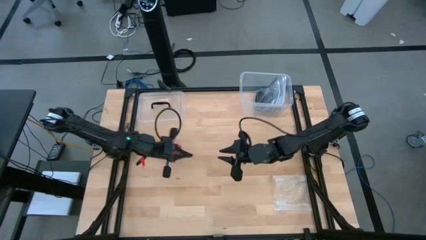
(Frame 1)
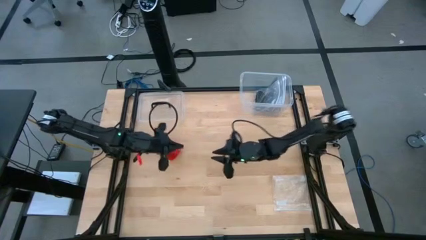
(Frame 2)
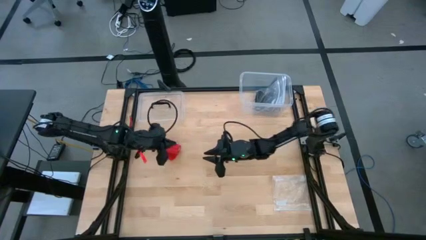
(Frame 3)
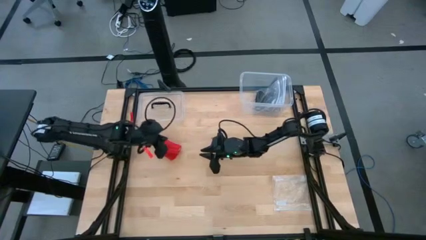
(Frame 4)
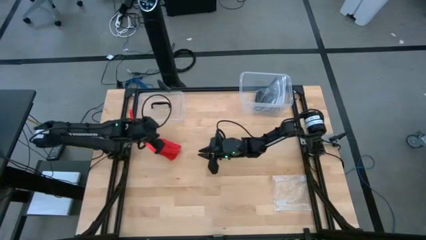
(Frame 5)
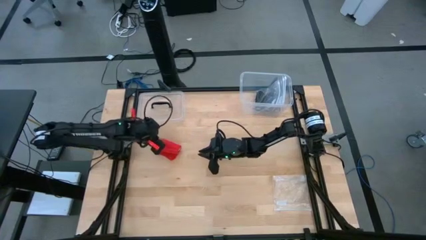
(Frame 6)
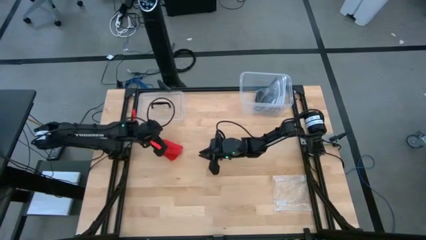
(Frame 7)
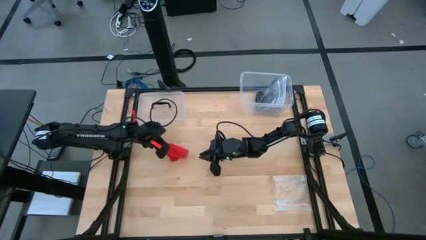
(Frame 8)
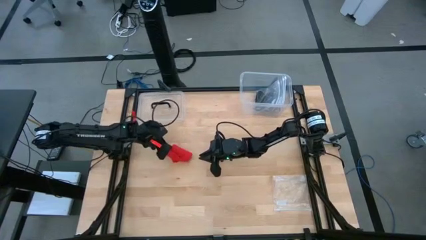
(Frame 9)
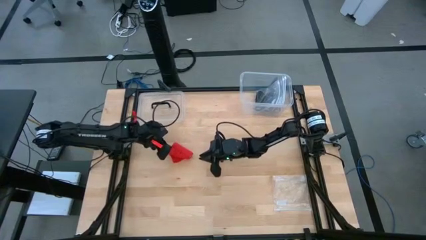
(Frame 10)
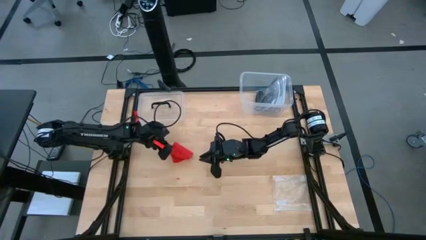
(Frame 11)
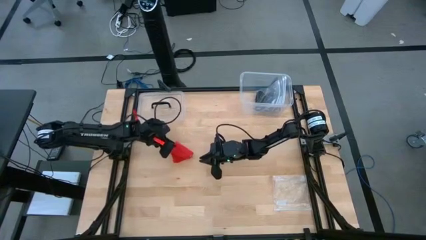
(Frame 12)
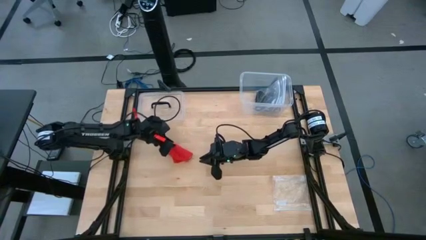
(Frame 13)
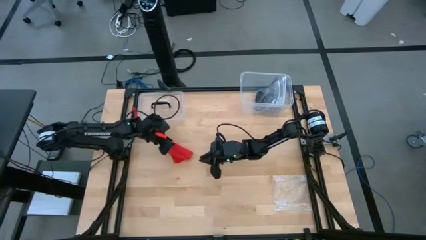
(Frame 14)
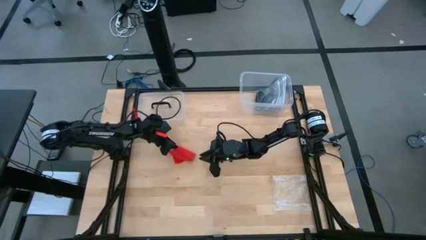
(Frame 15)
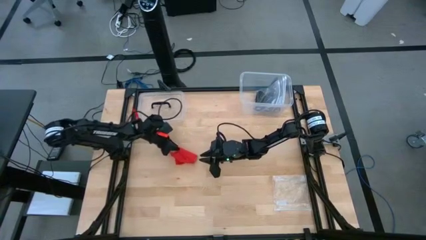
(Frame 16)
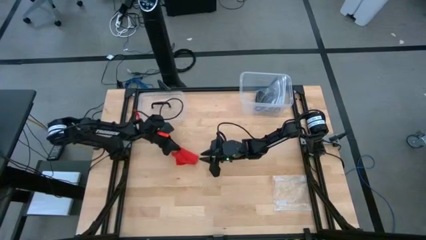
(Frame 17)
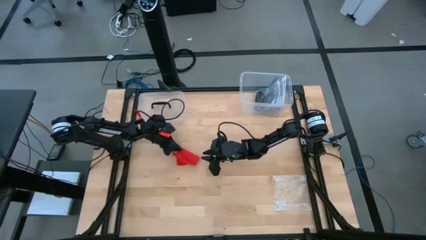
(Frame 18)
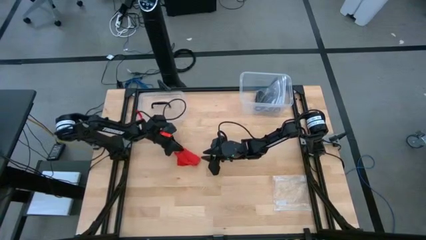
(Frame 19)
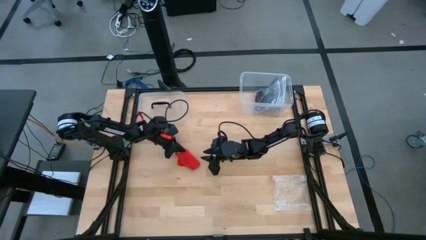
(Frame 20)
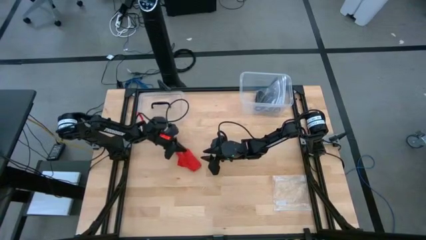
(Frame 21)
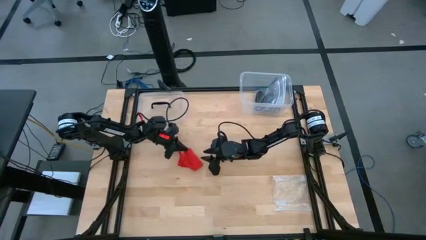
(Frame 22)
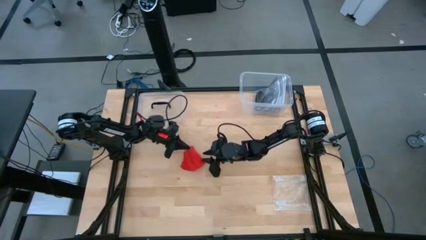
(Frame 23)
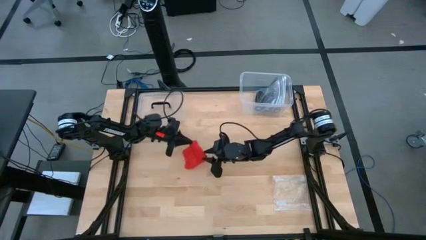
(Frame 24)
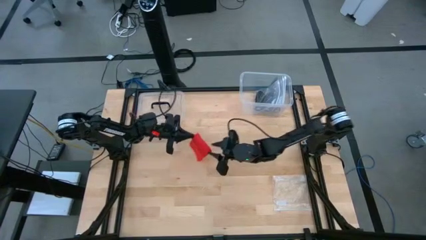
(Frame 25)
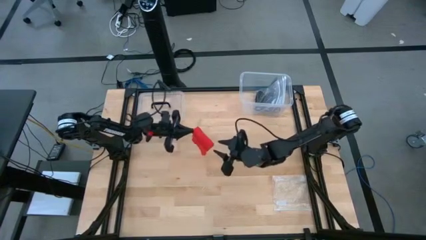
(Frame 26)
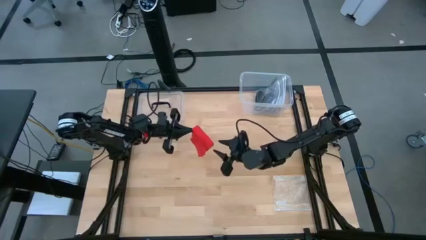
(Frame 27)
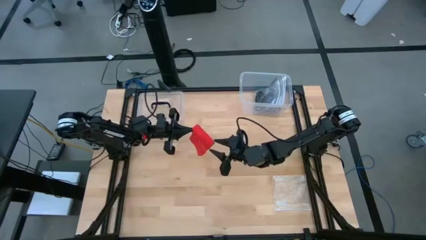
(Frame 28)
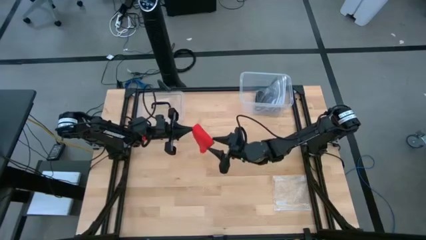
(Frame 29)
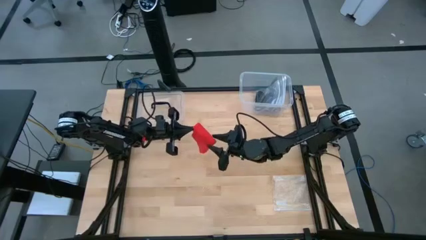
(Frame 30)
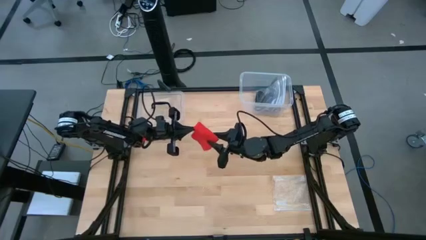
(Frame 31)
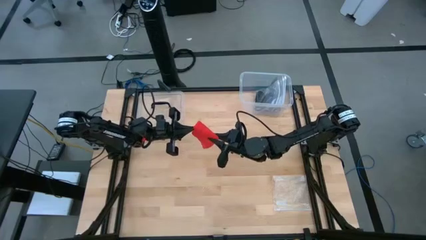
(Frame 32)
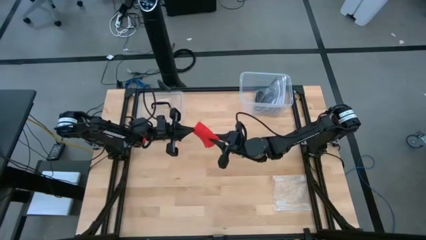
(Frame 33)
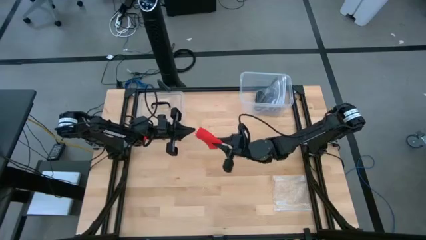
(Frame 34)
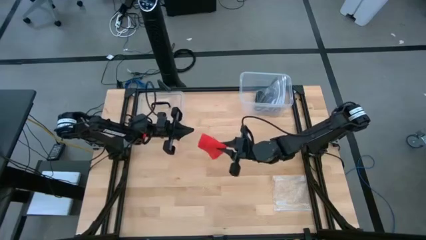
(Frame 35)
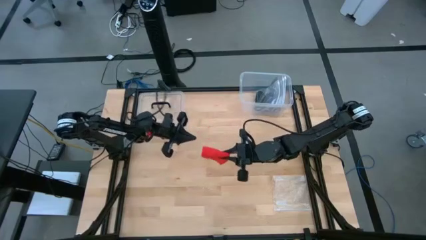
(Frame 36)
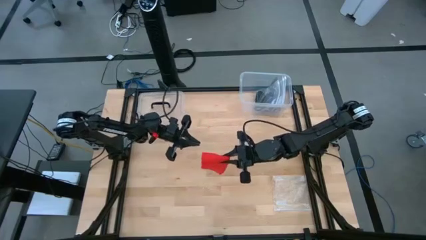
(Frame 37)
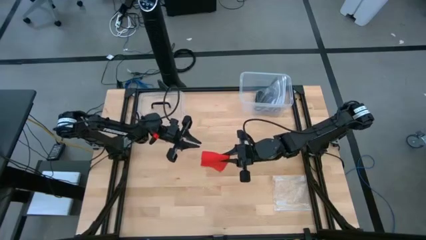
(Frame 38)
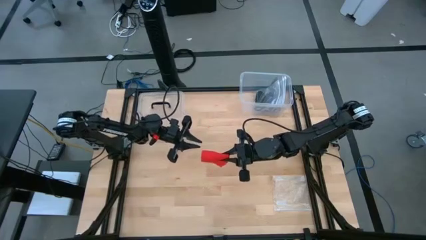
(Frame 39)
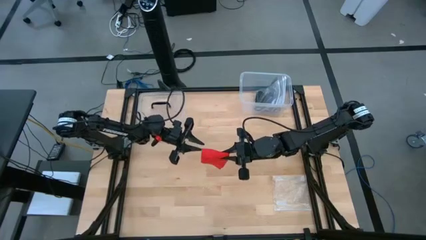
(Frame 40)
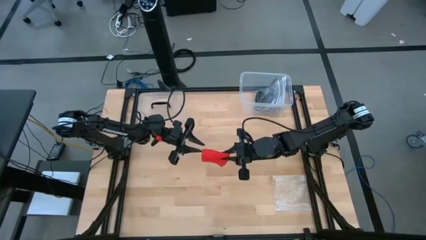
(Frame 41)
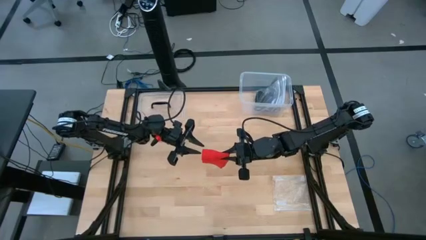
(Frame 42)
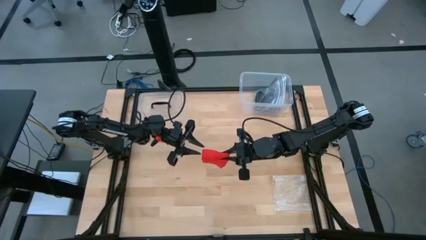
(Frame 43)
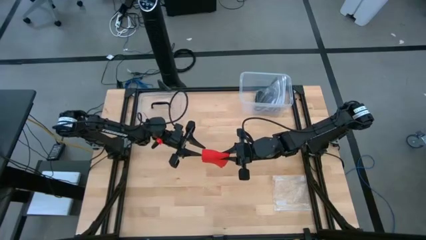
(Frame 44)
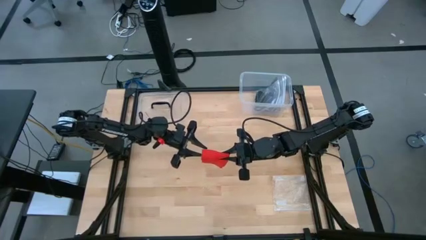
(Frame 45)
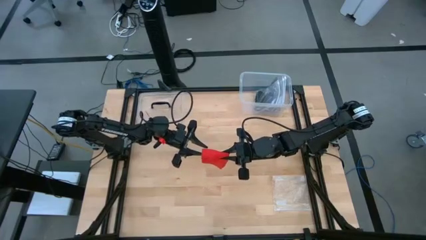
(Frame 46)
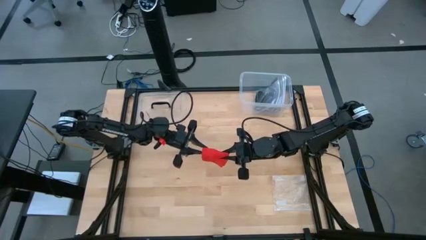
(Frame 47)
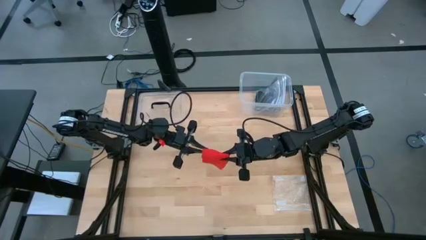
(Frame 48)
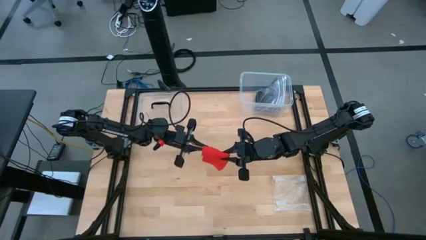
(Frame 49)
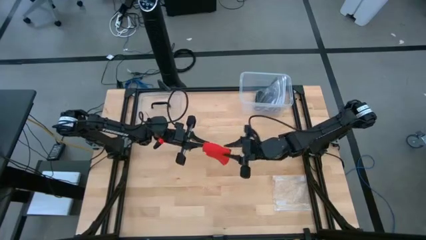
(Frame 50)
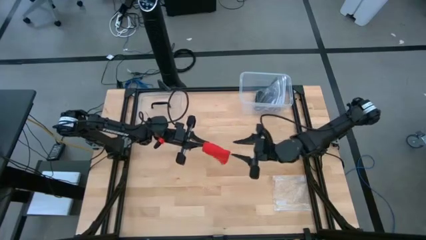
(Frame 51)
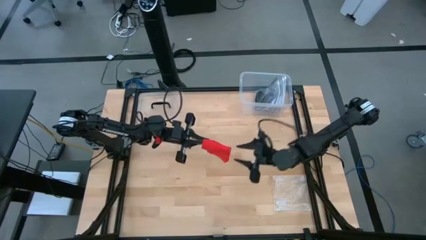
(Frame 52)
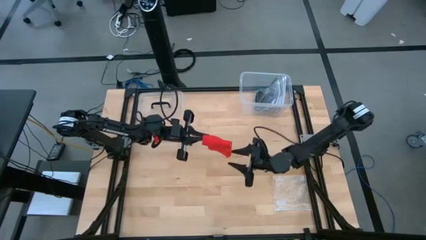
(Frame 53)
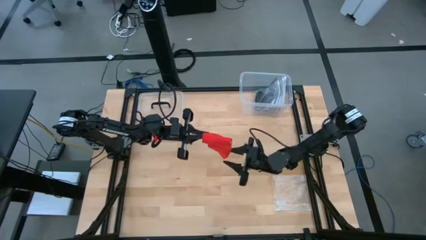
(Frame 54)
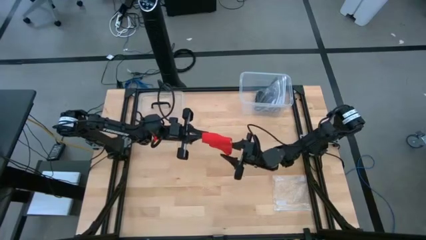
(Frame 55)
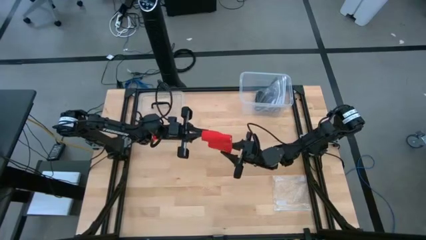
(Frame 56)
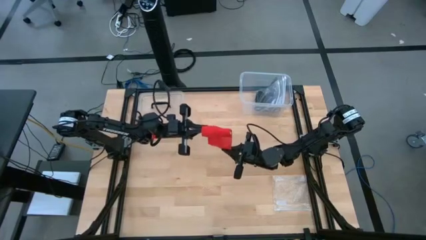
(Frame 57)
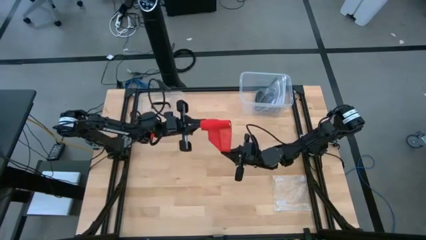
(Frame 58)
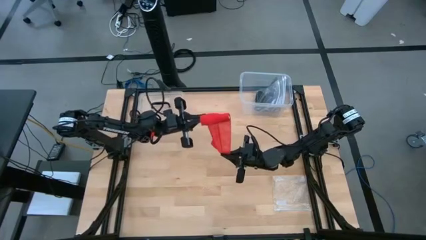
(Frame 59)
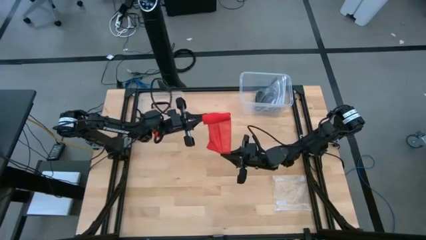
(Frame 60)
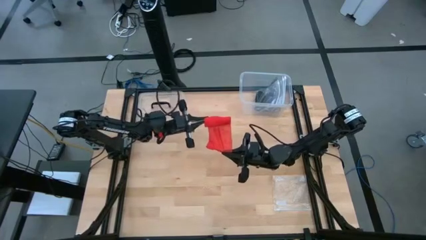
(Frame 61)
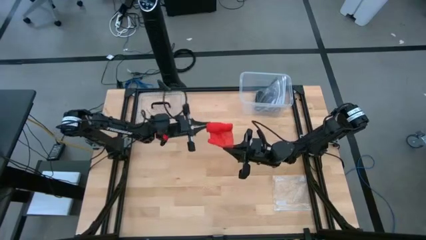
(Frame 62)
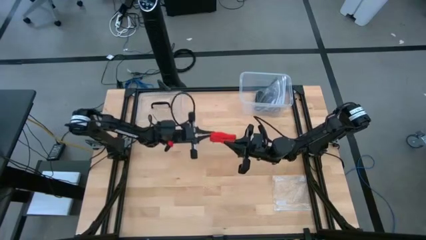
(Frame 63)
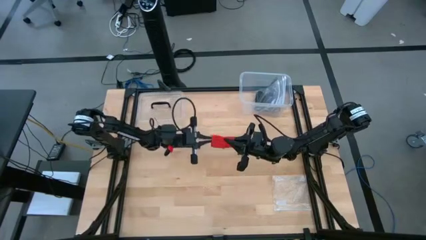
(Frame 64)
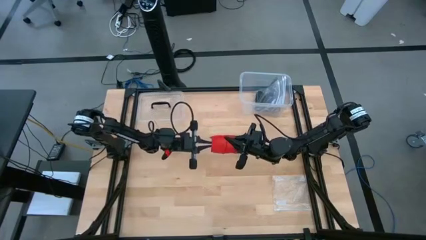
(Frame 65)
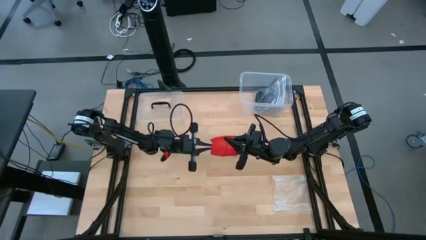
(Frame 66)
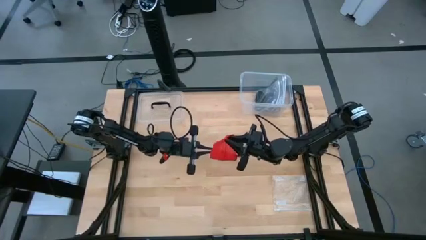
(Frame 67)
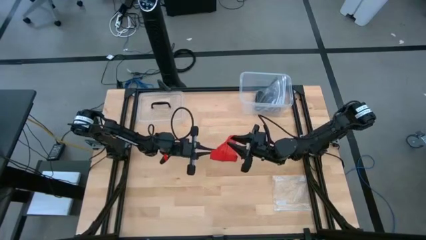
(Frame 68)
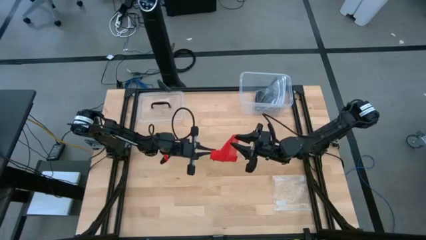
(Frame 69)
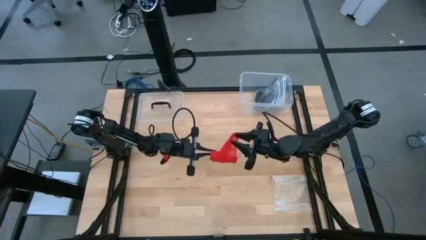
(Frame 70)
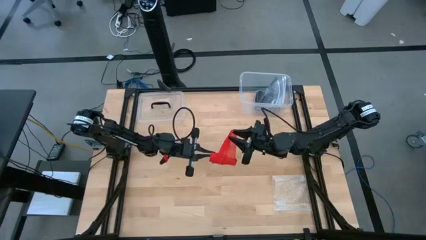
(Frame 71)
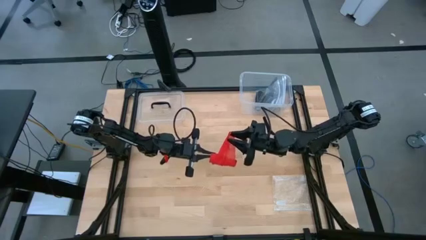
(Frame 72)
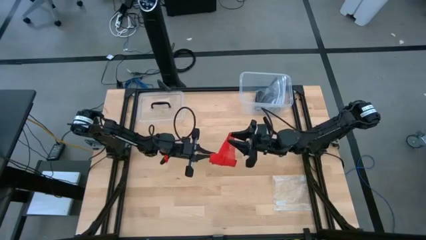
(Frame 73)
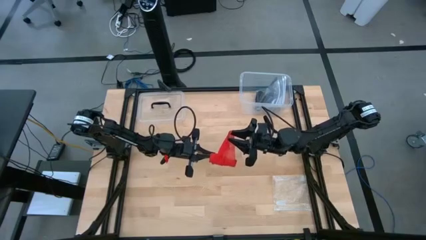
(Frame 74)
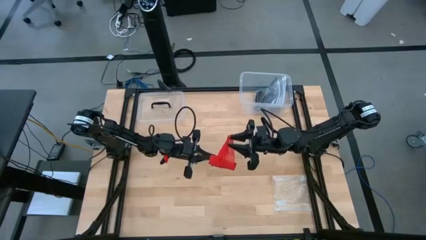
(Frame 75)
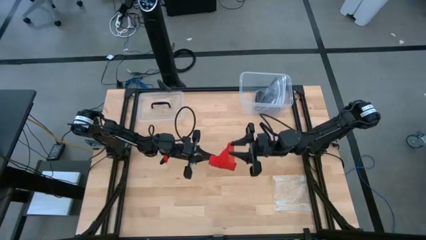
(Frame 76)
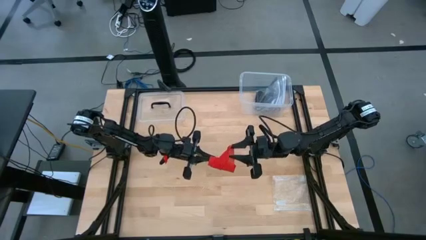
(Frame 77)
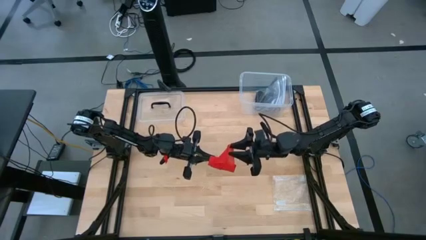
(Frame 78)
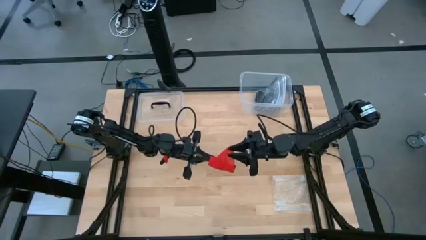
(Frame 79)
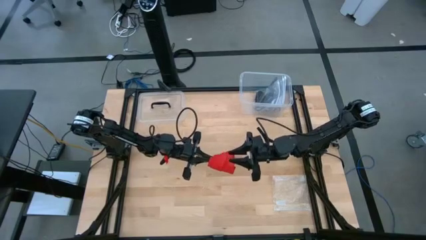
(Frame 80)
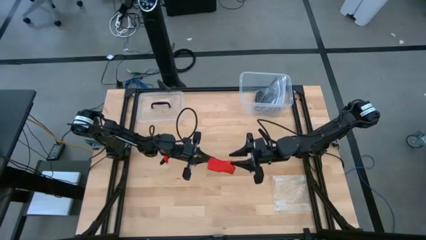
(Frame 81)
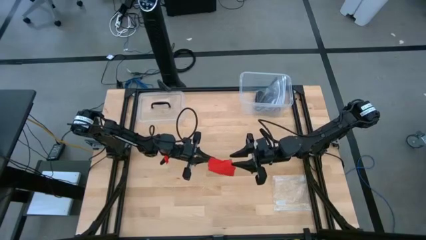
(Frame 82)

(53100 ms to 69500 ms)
Task: Roll bandage
Roll the red bandage
